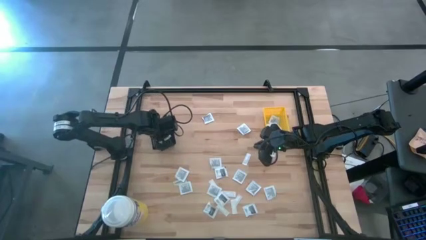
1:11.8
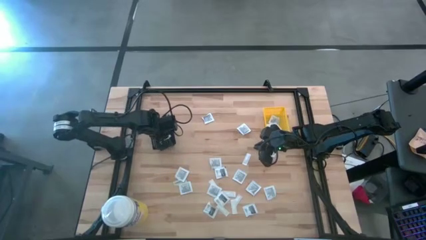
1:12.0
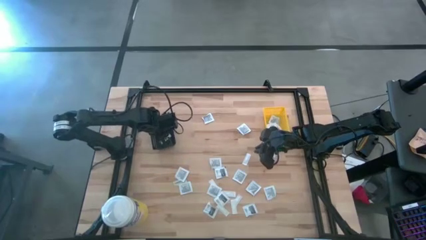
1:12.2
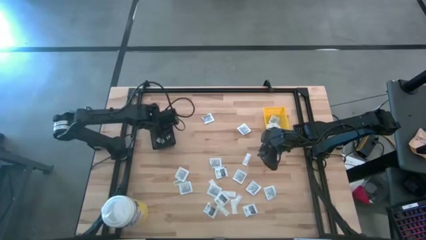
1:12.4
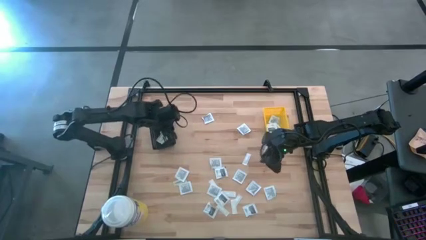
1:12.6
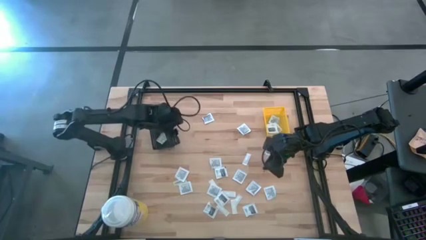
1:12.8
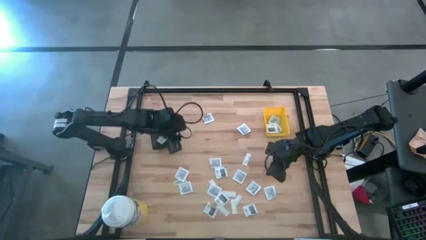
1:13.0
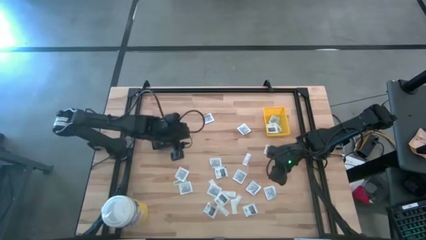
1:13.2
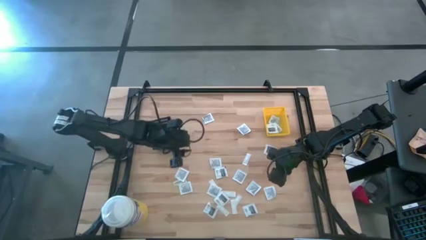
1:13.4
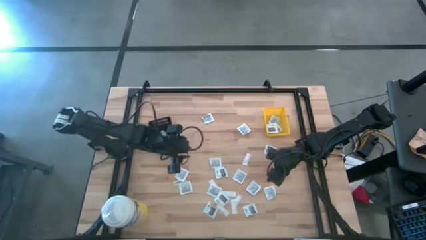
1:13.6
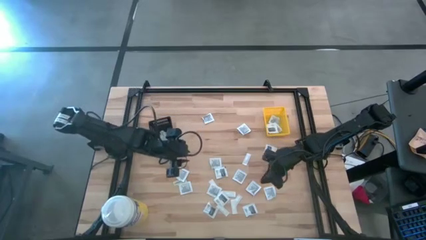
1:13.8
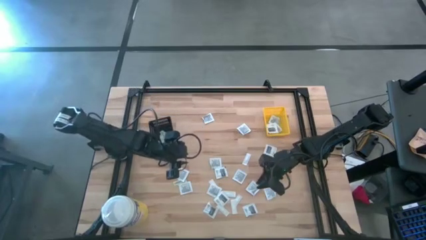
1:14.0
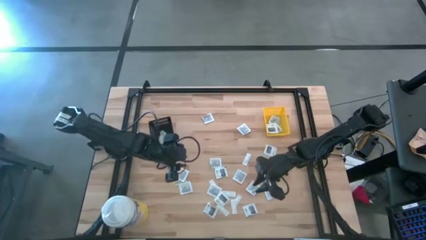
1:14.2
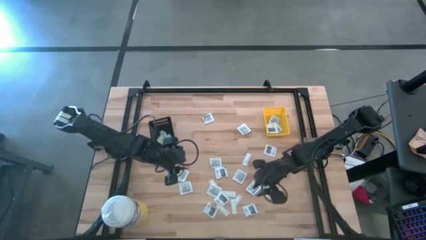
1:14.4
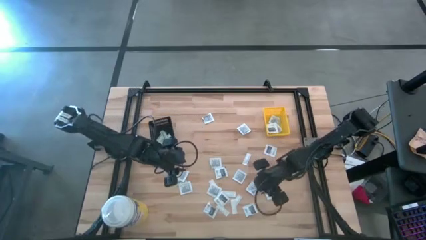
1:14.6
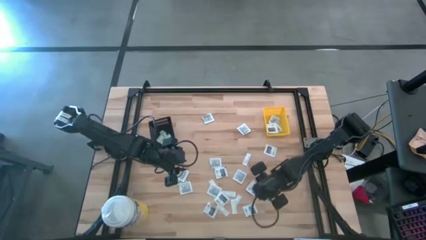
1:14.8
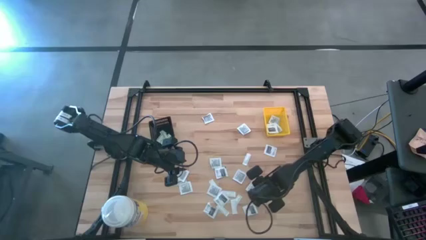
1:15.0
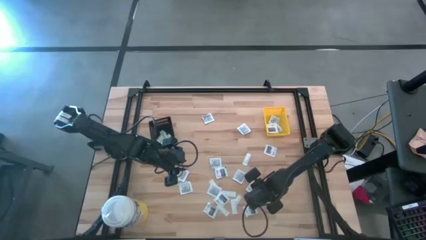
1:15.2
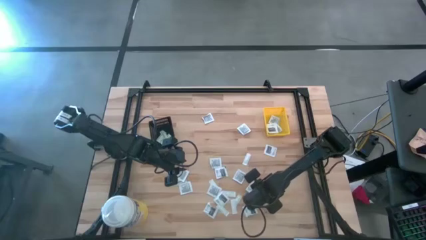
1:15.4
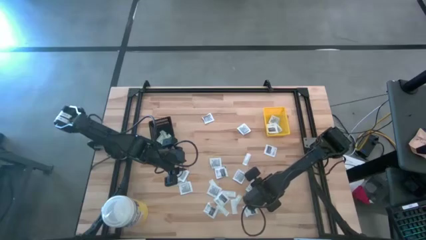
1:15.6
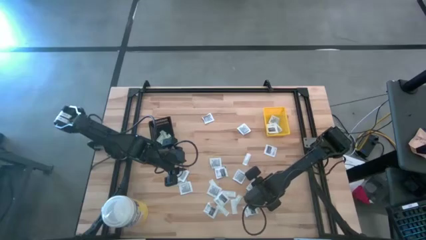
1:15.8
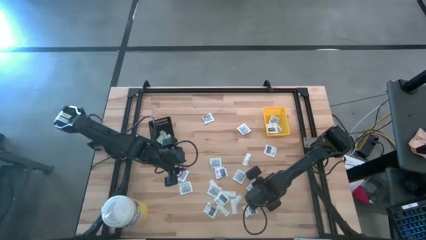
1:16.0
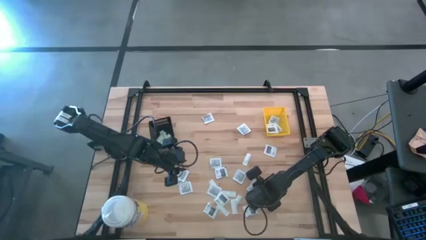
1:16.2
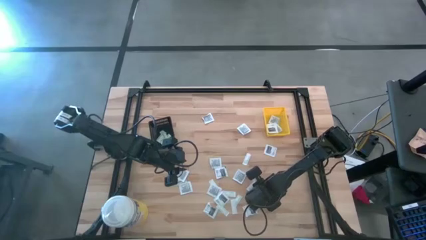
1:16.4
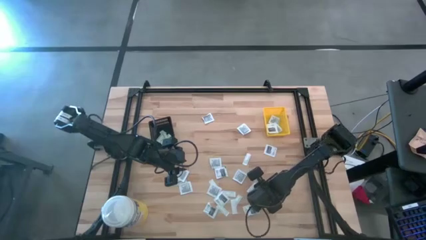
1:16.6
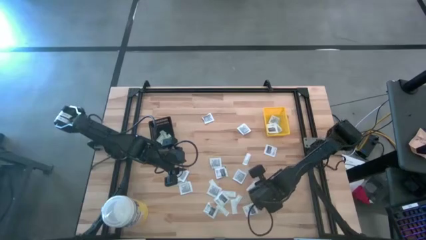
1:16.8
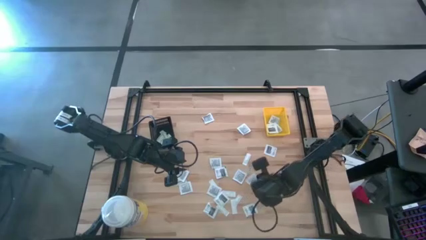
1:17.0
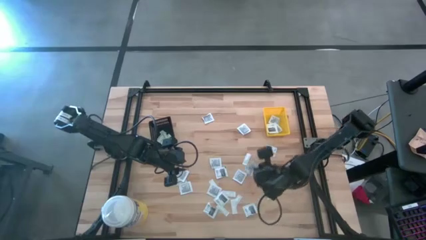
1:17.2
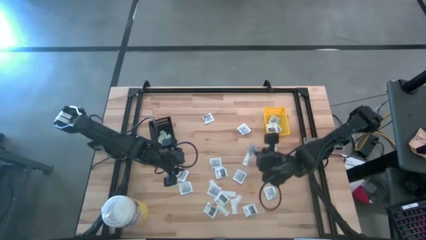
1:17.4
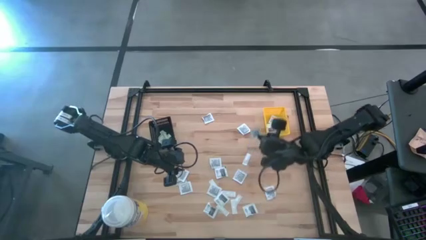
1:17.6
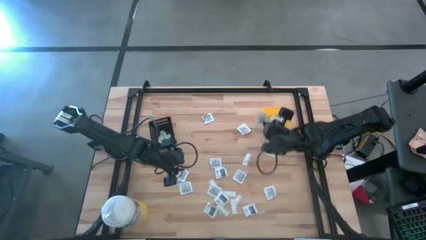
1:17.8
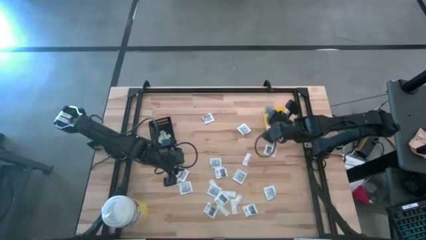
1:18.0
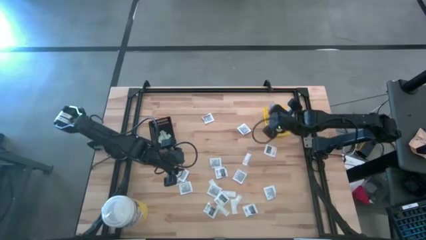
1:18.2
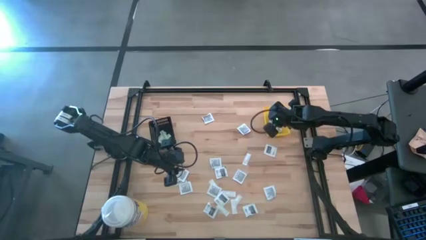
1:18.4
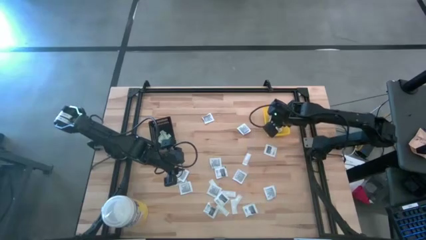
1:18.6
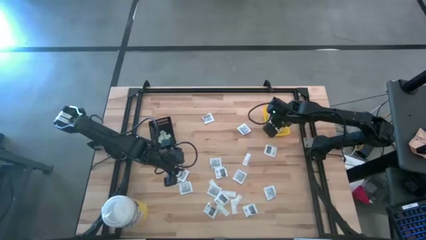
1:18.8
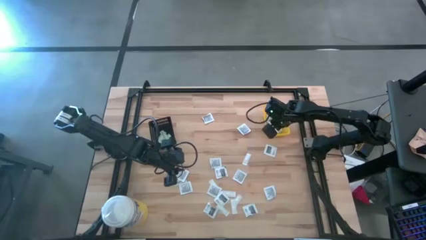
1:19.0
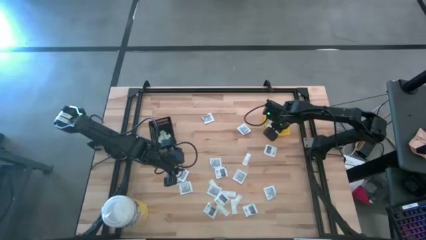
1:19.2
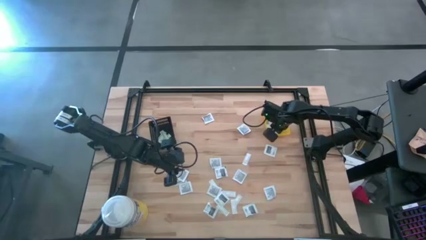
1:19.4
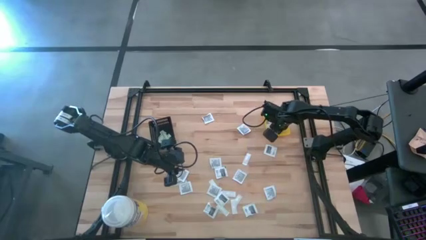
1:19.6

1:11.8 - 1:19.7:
Task: Pick & Place First Aid Supplies
Put the black pad into the yellow bin

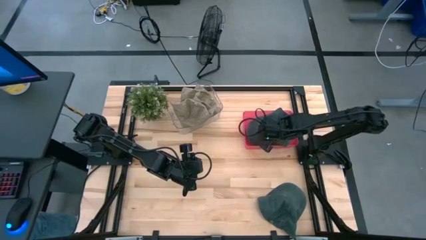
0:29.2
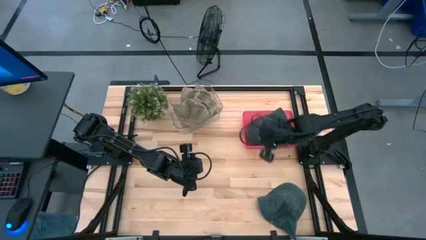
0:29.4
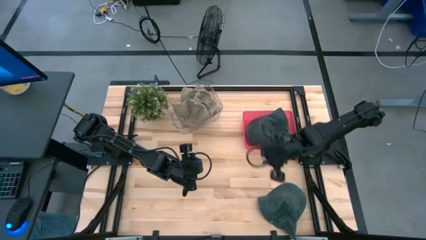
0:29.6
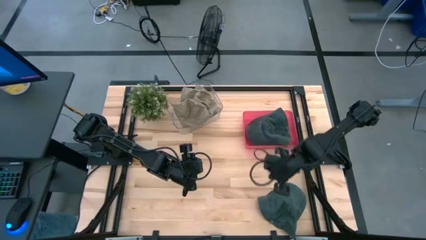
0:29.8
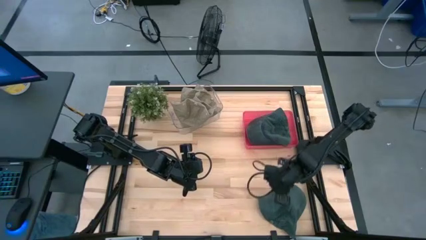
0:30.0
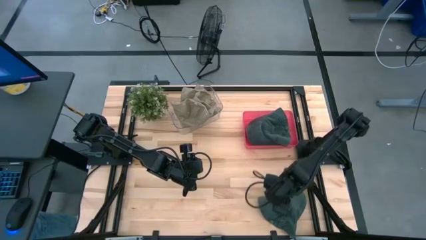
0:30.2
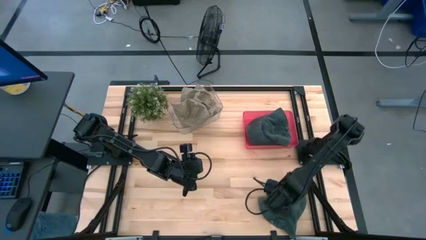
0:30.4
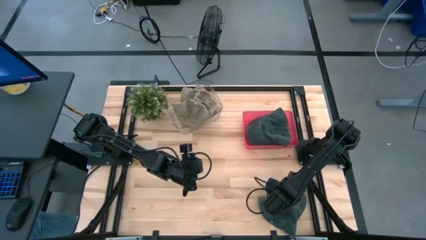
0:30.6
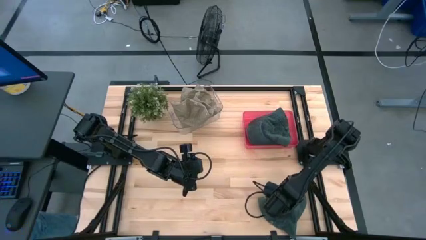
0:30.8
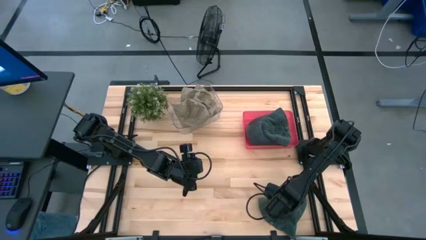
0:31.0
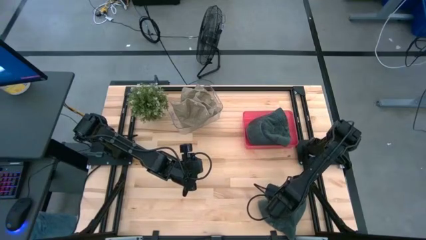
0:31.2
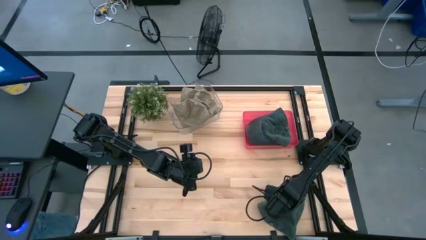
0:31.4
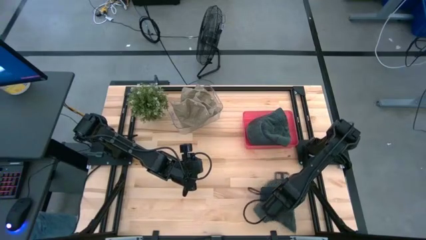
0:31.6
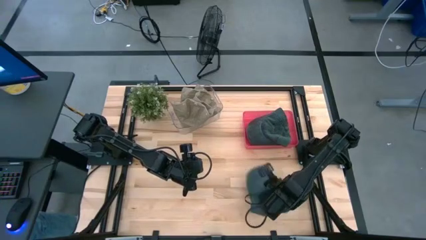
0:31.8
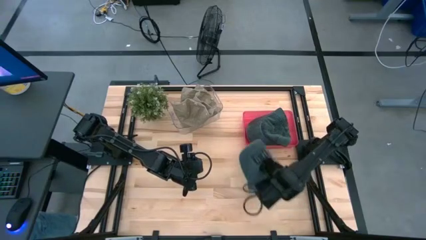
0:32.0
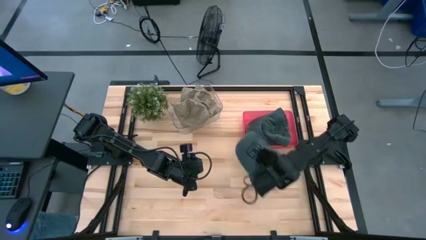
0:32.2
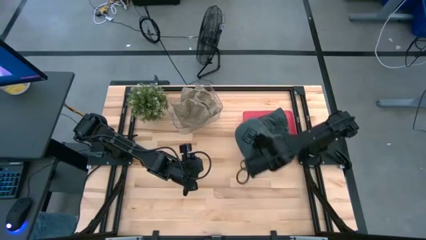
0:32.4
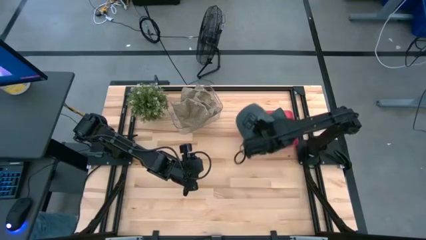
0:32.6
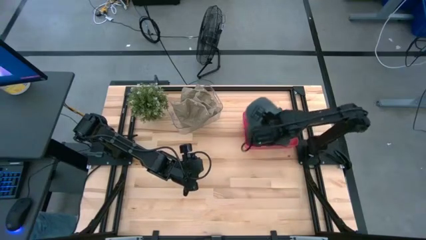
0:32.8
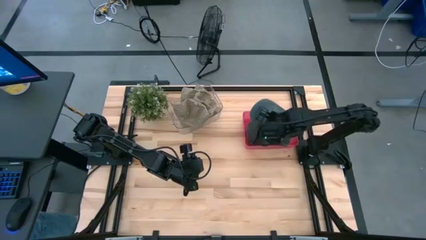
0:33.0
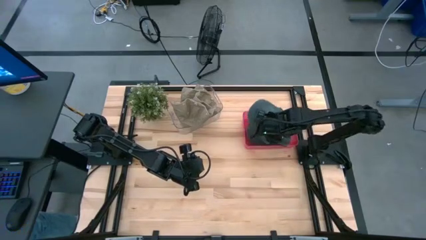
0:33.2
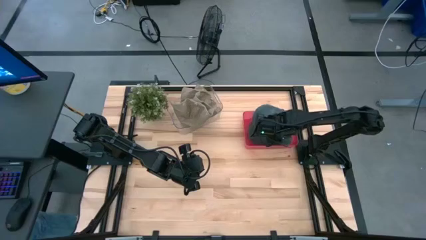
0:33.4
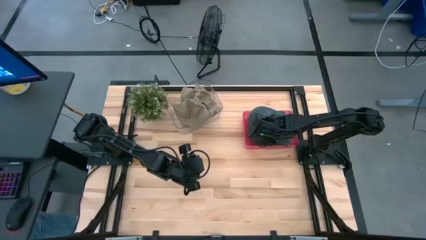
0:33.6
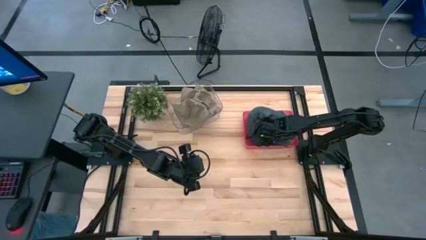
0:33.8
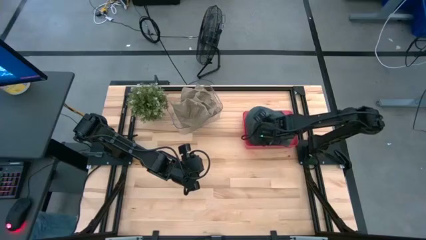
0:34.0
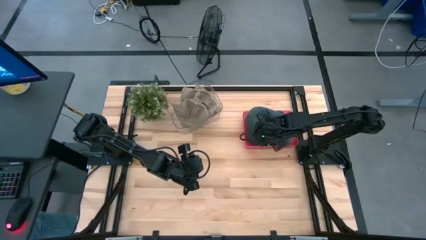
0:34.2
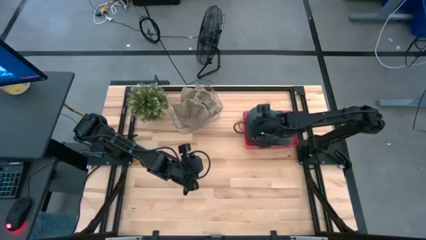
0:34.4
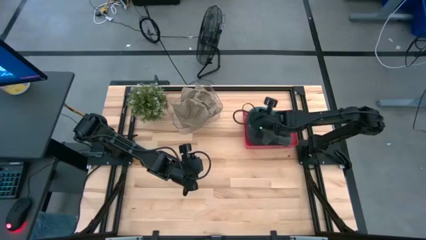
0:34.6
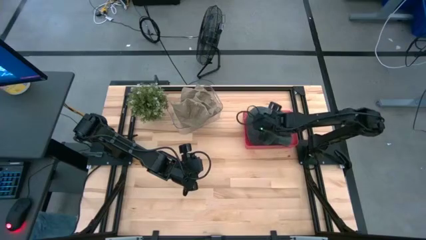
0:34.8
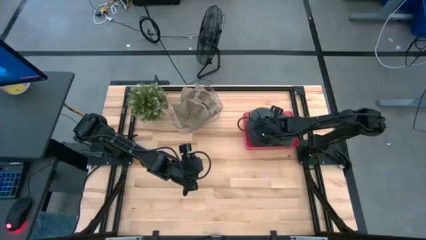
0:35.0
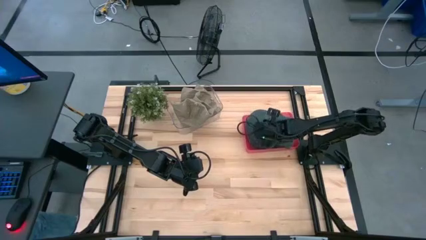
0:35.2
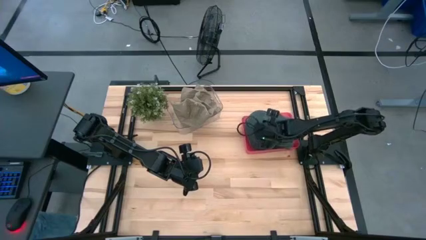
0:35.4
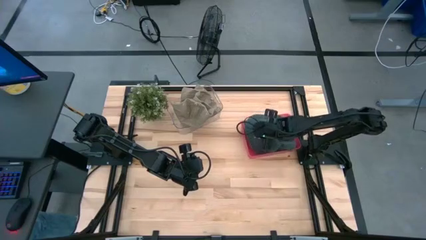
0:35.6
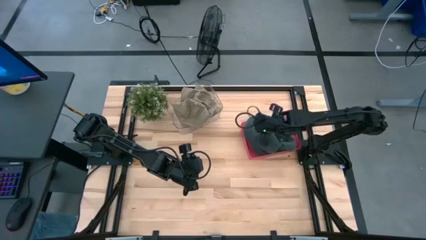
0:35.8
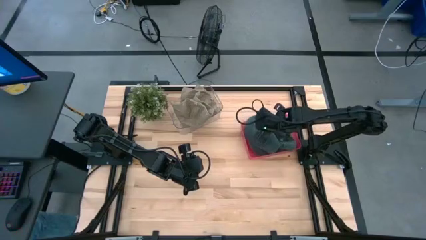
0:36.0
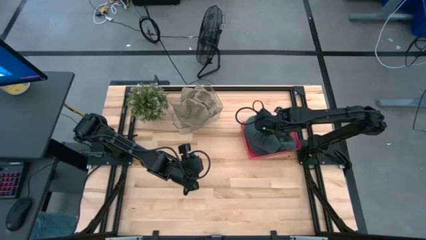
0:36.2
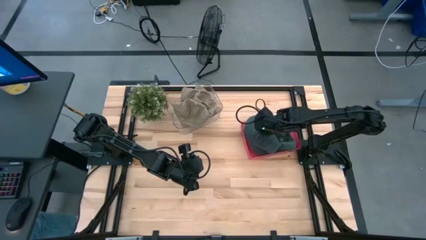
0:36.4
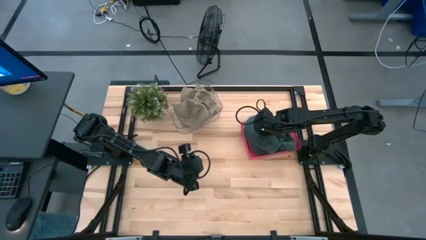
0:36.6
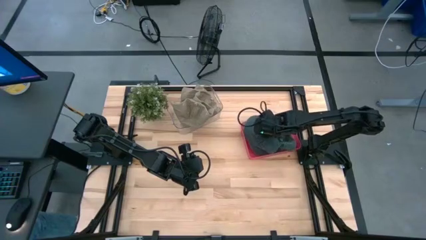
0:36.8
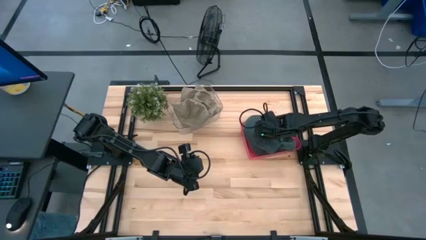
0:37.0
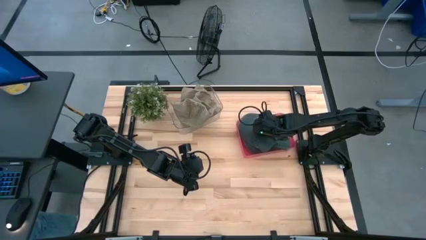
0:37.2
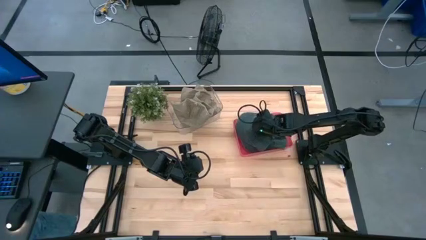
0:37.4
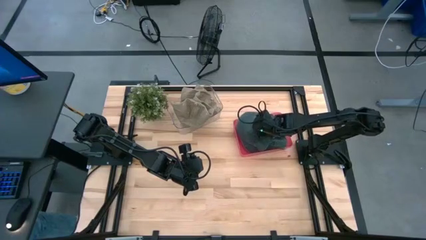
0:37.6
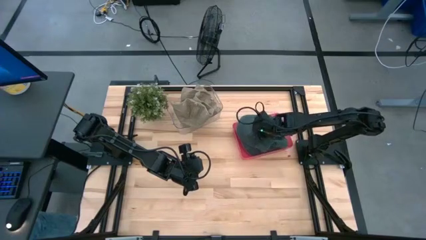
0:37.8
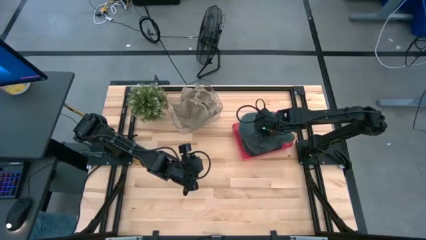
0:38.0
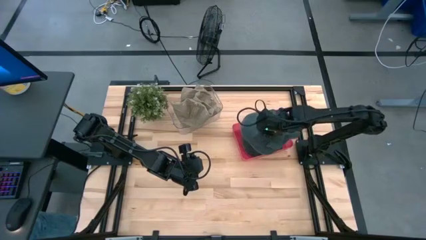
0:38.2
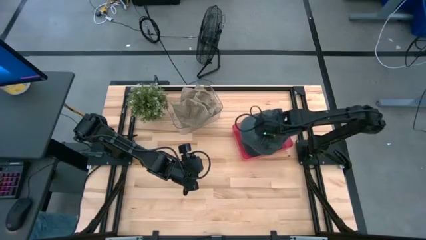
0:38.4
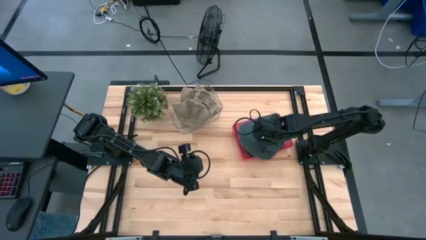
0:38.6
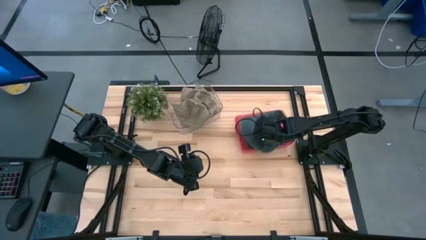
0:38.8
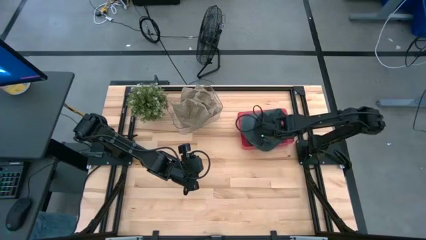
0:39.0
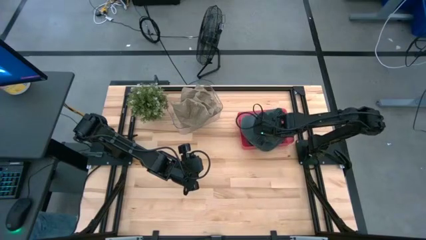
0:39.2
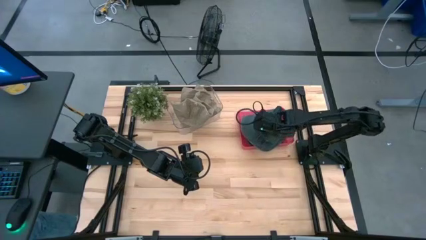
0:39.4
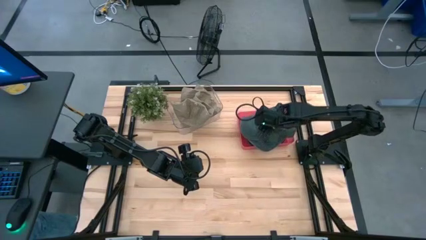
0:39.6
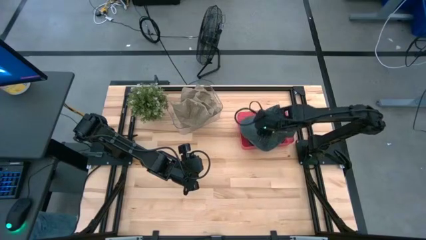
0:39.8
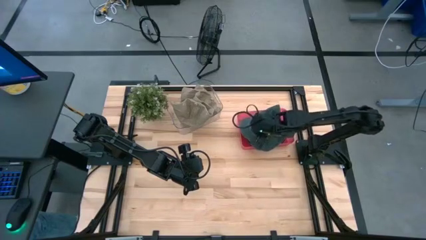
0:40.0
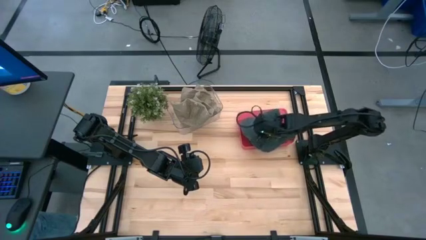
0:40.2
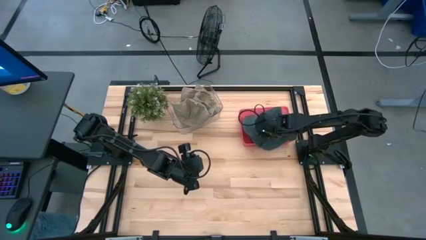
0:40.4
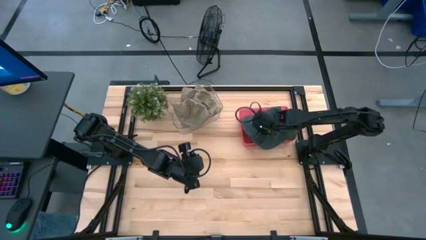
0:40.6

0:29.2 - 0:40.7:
Task: Pick & Place hat
Put the black cap into the red bin
